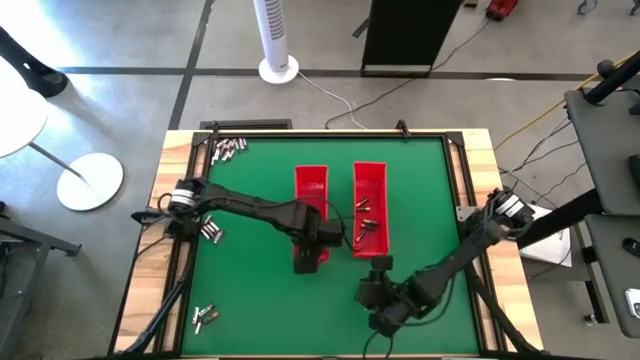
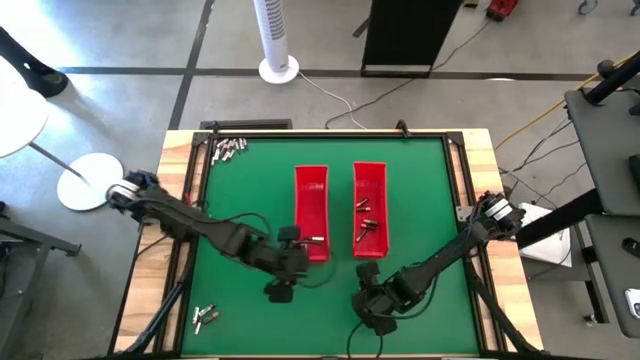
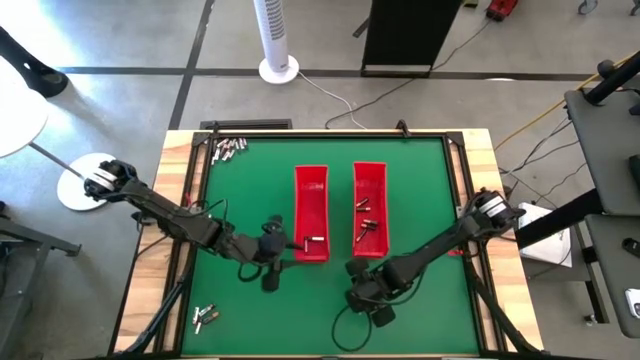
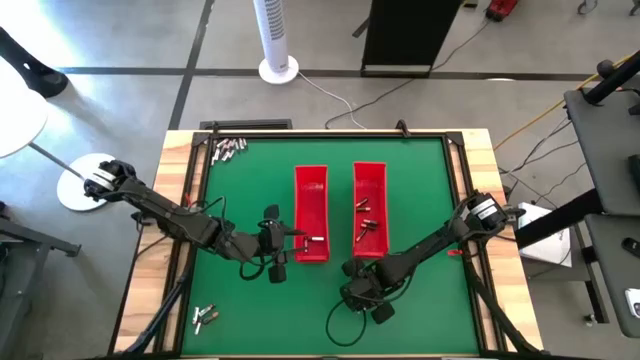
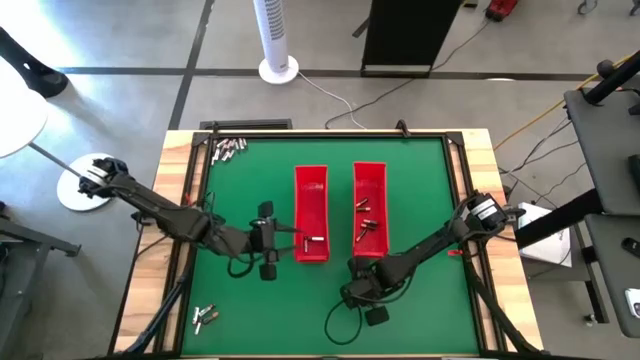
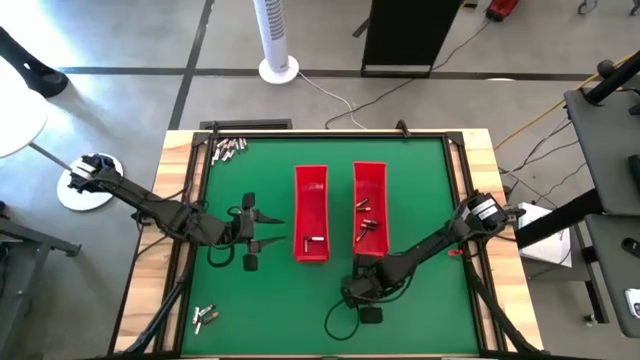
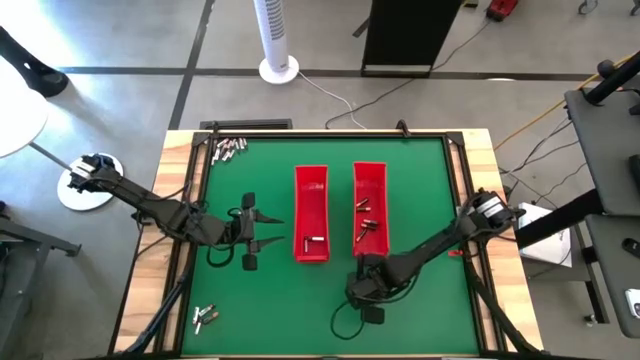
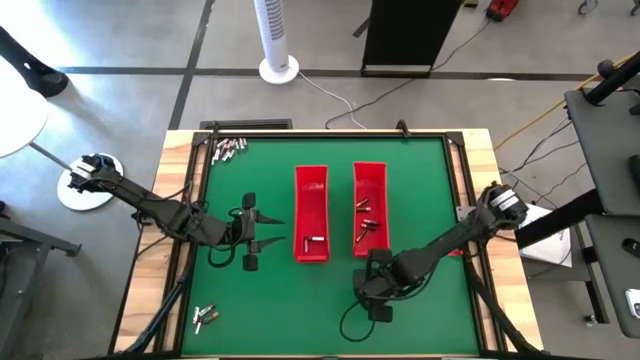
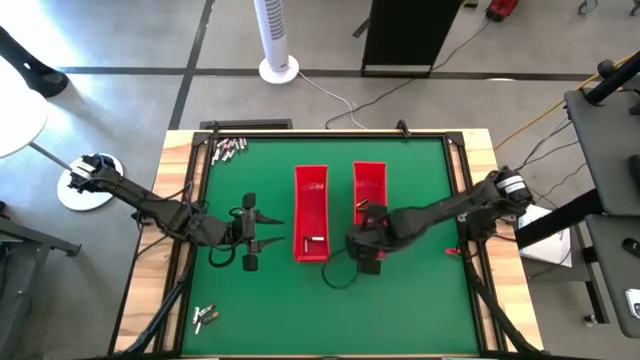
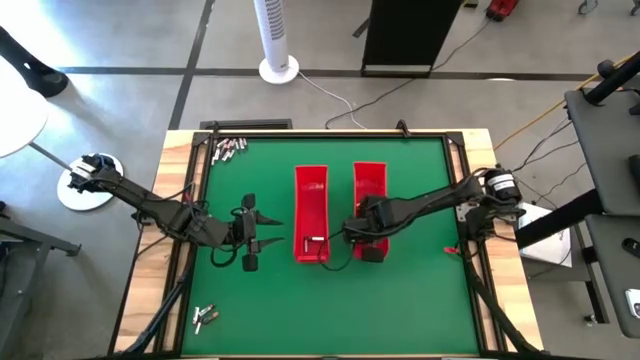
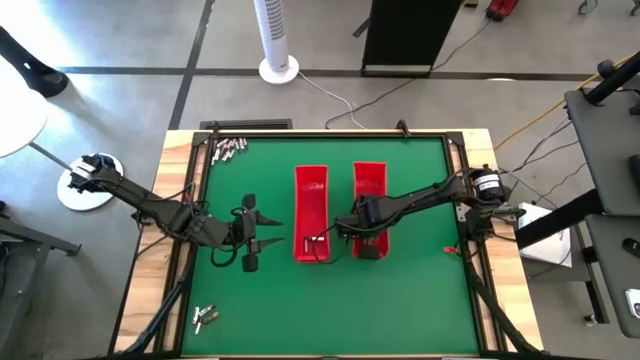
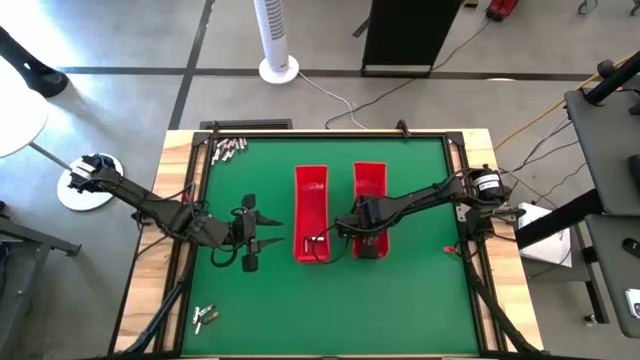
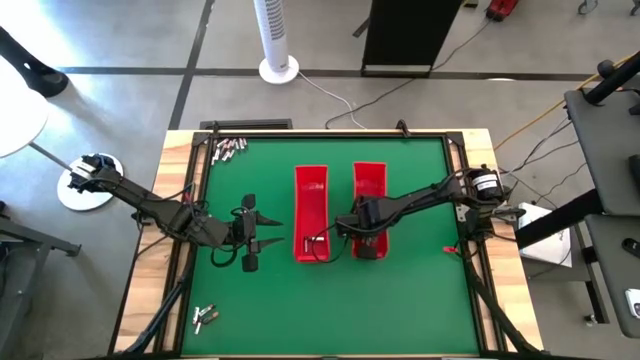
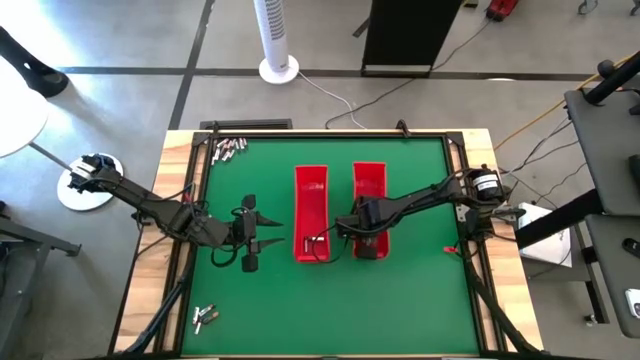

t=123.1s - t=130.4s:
Task: Sort batteries
Put the black battery into the right red bin

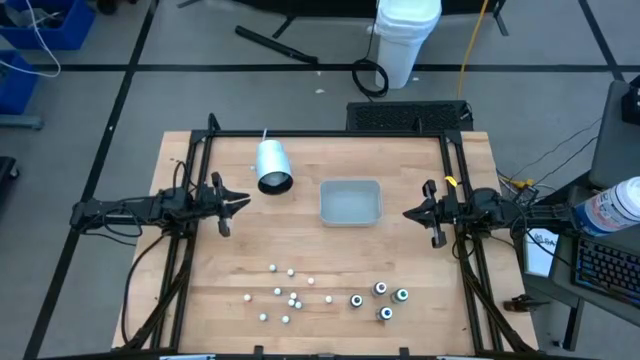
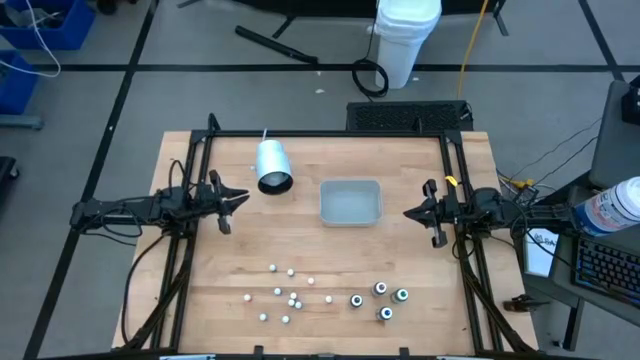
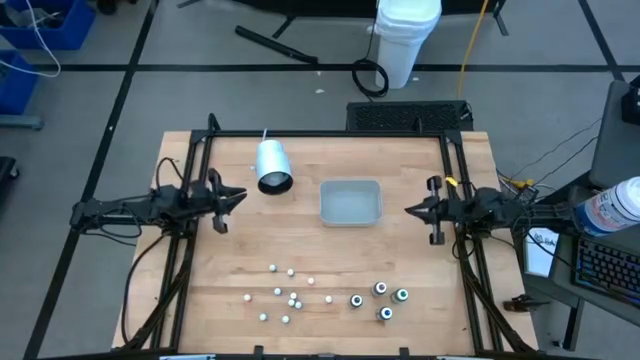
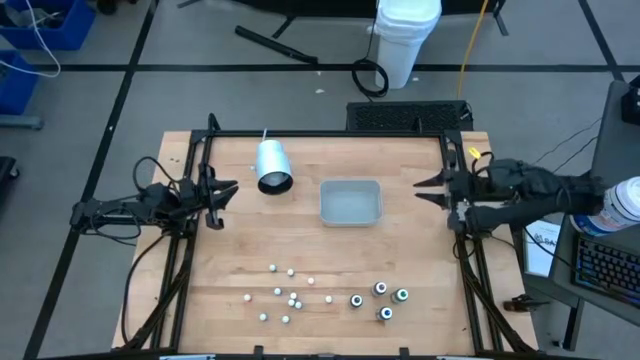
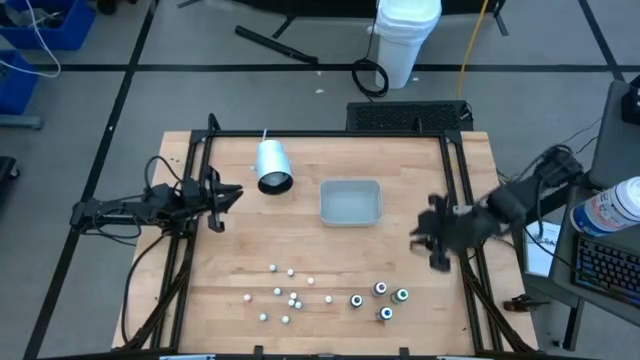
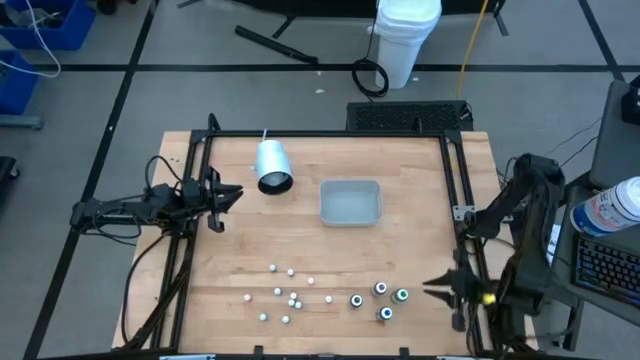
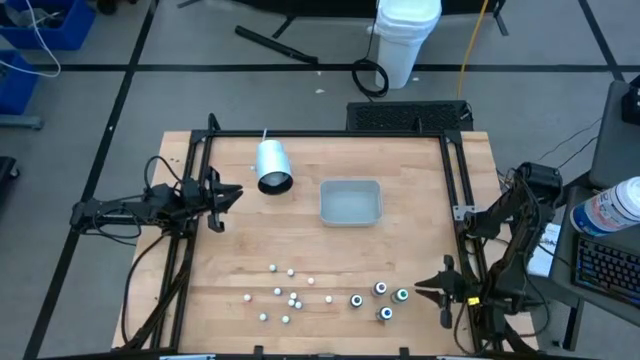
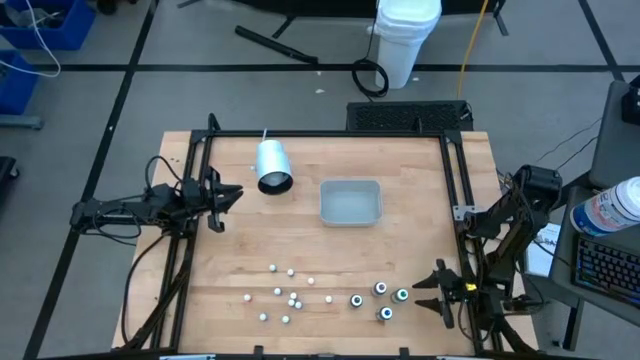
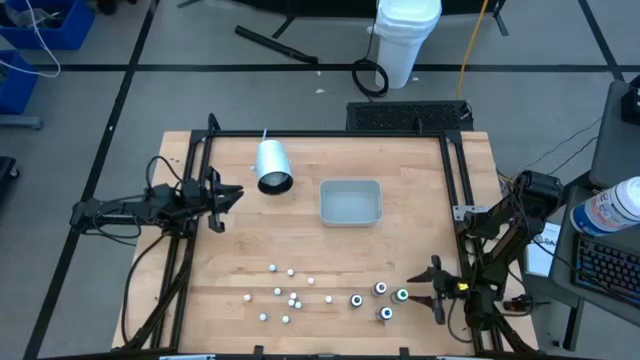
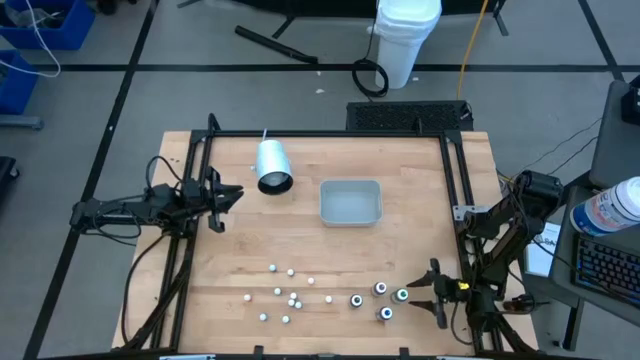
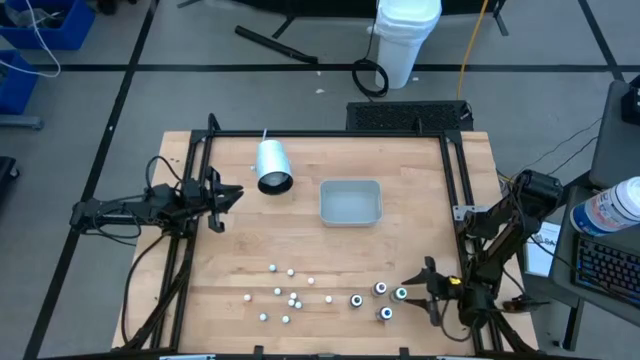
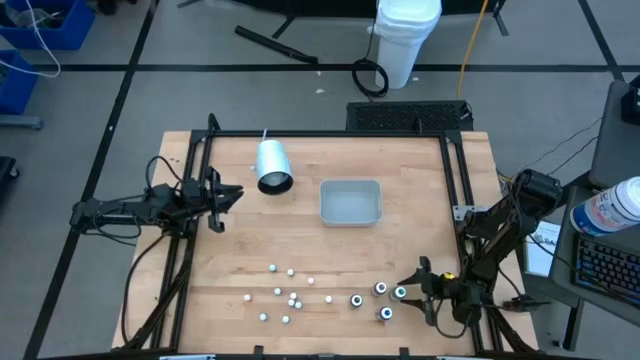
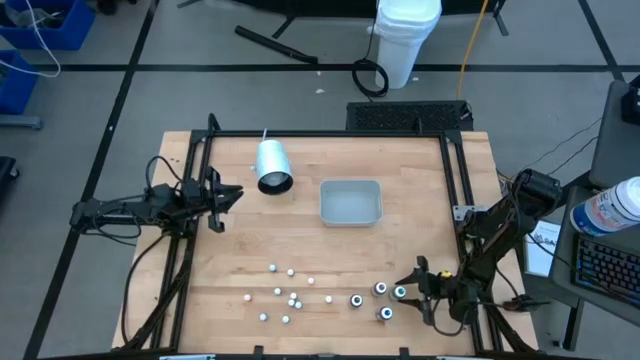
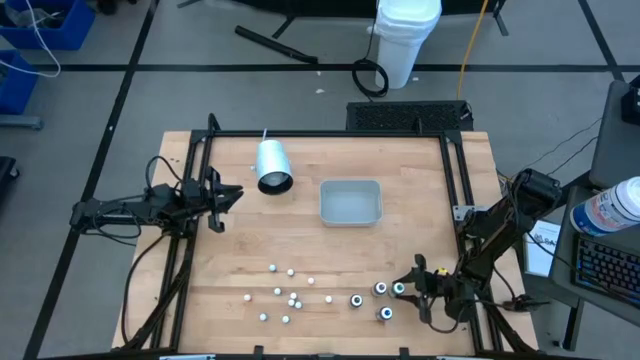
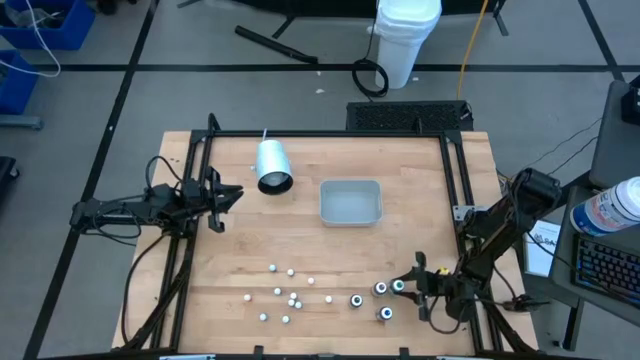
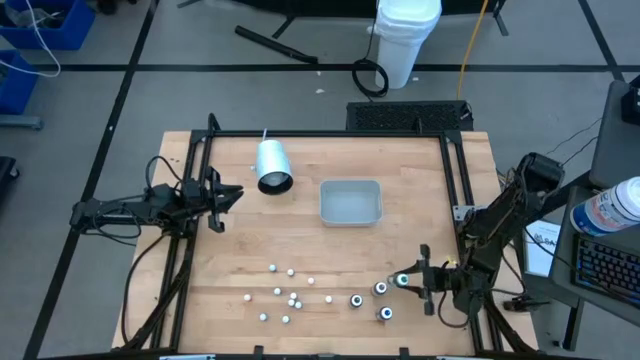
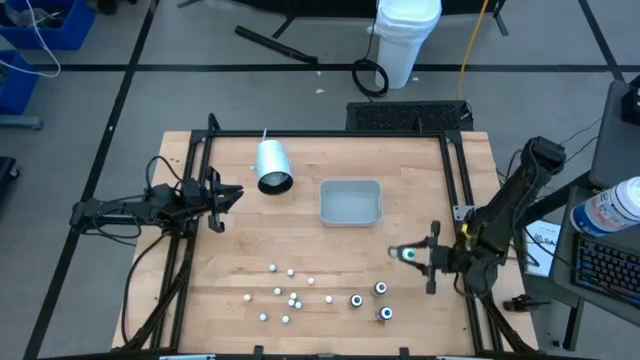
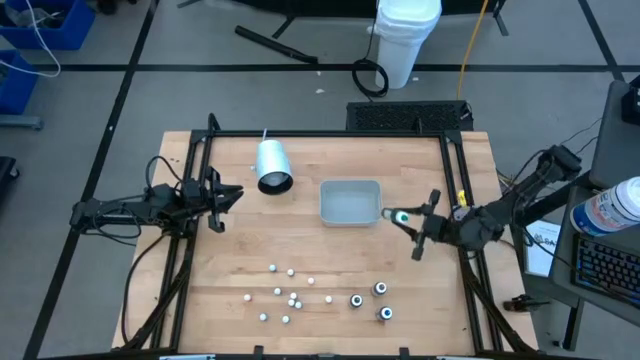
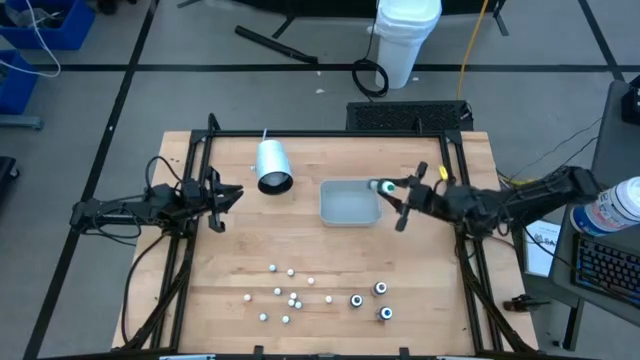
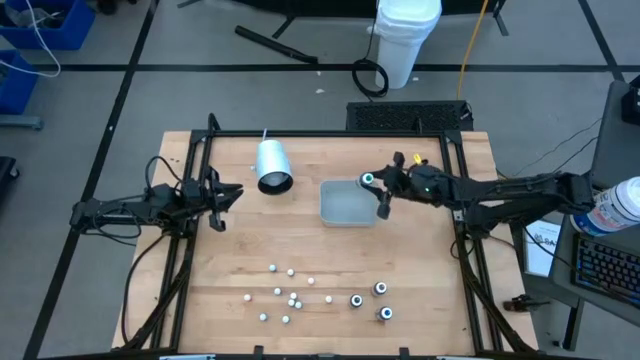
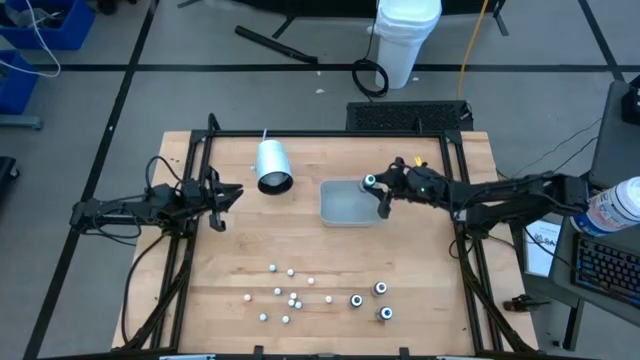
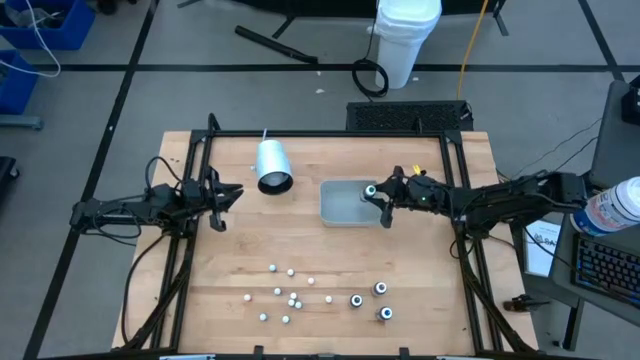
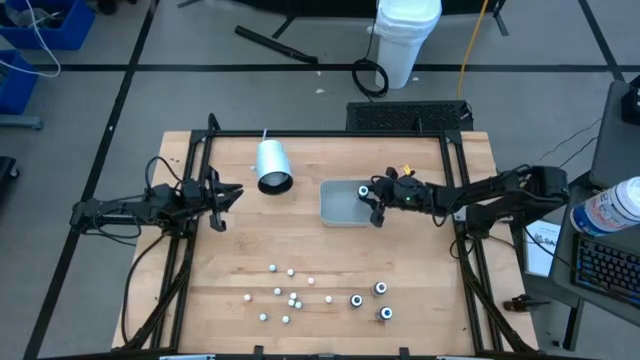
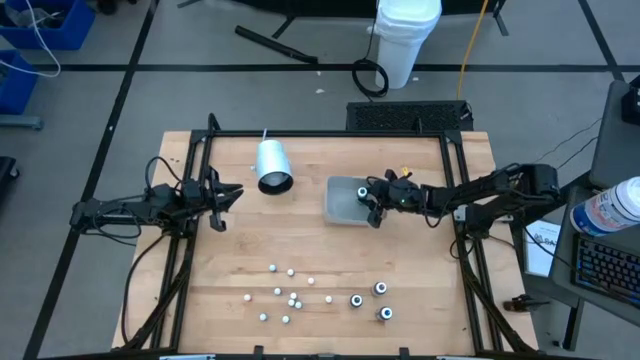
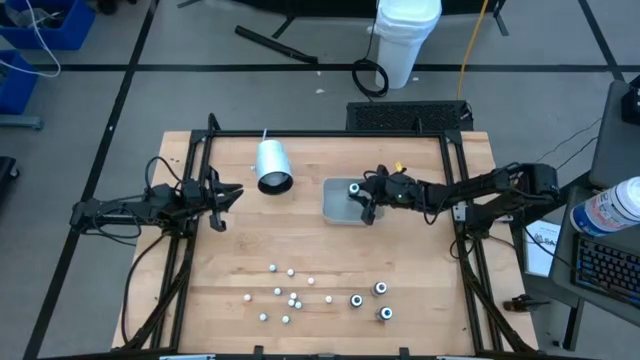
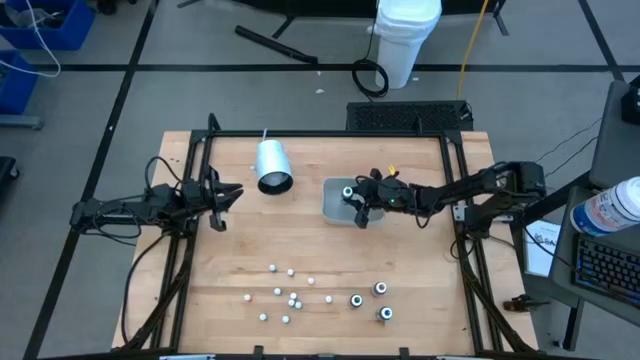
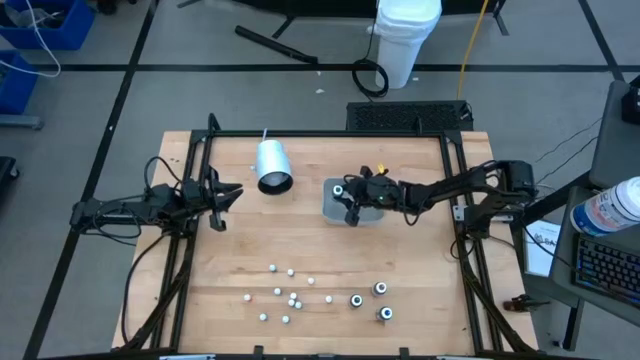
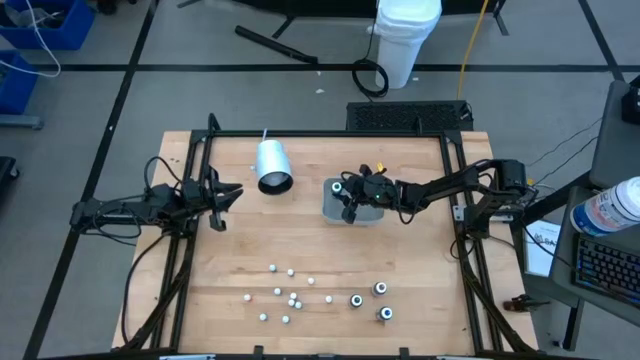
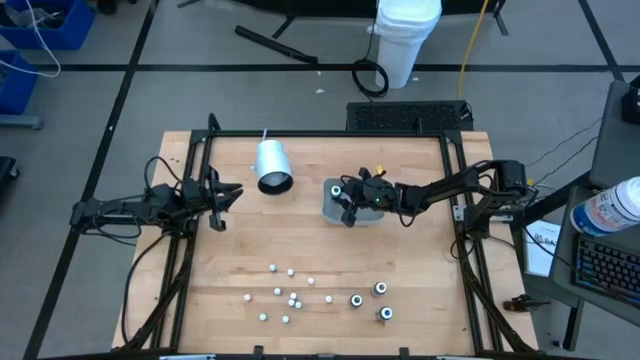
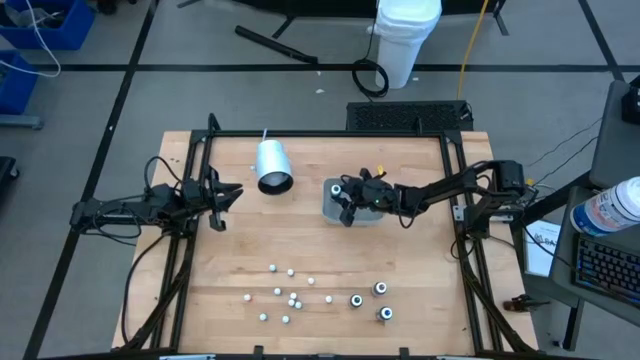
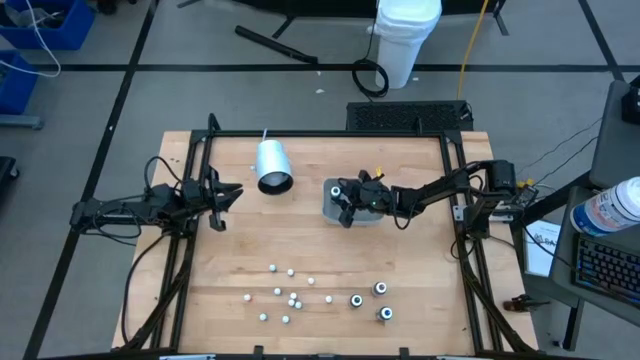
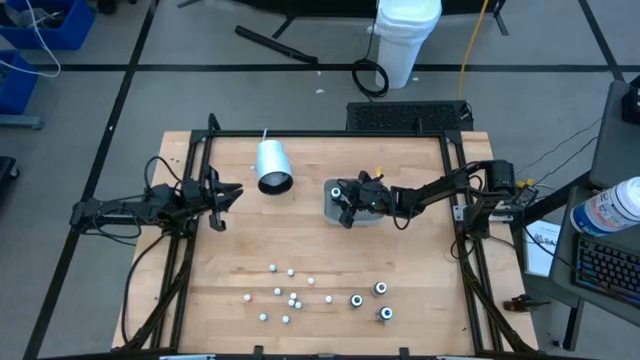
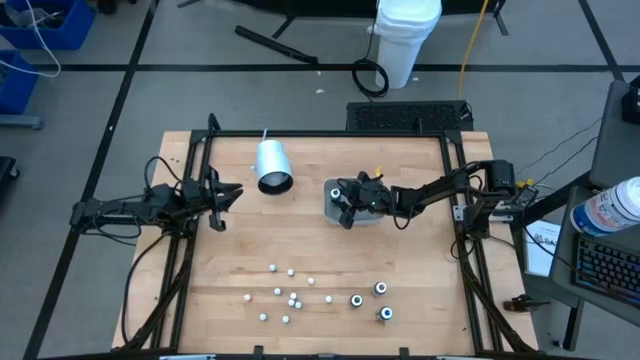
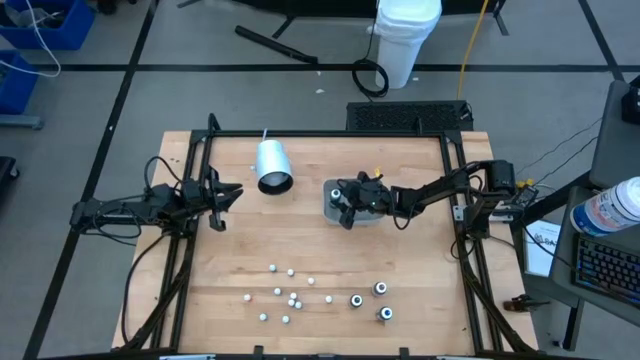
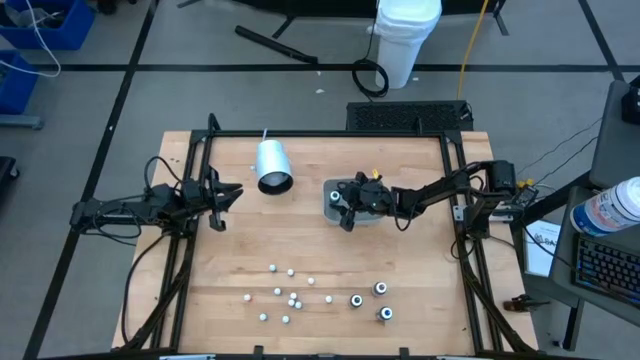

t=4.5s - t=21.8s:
Task: Pick & Place food coloring
Put the green food coloring bottle into the gray bin
